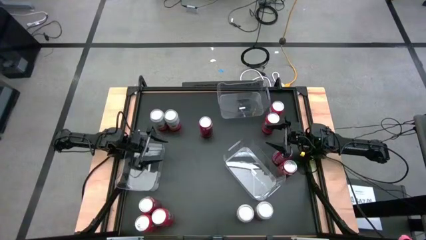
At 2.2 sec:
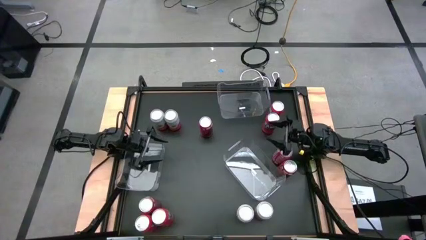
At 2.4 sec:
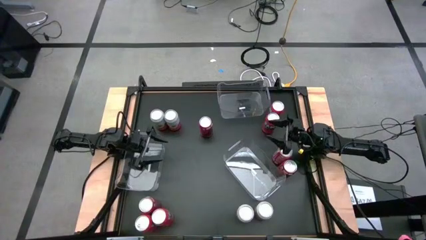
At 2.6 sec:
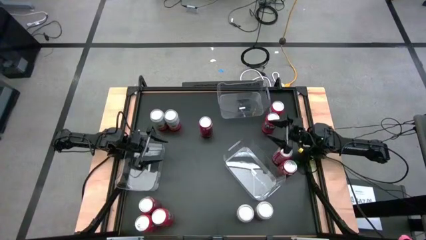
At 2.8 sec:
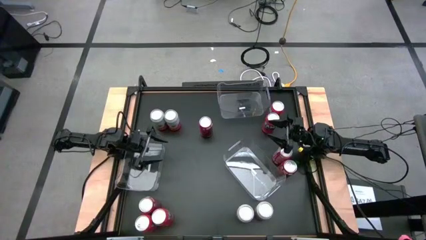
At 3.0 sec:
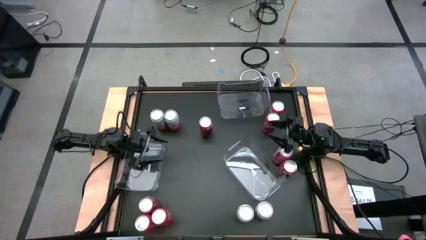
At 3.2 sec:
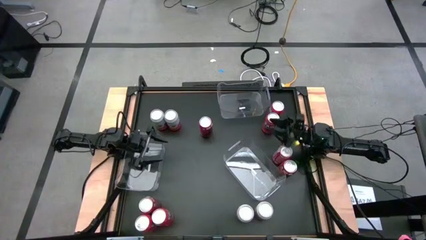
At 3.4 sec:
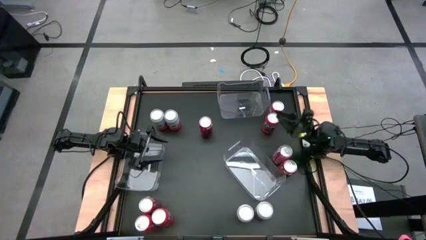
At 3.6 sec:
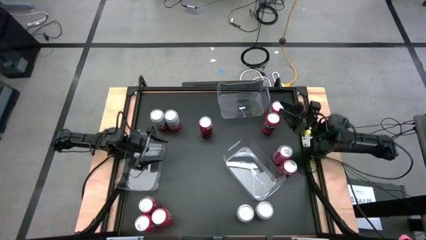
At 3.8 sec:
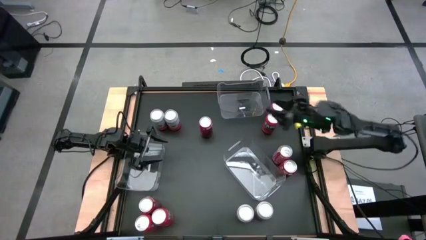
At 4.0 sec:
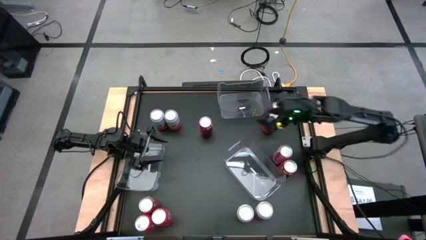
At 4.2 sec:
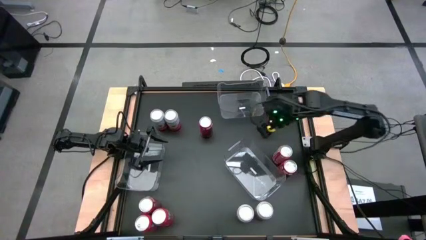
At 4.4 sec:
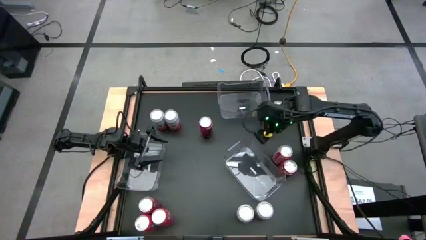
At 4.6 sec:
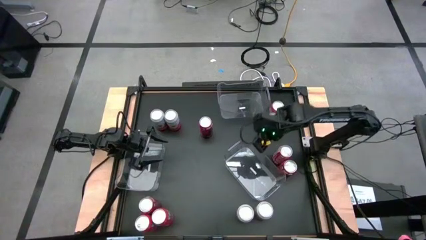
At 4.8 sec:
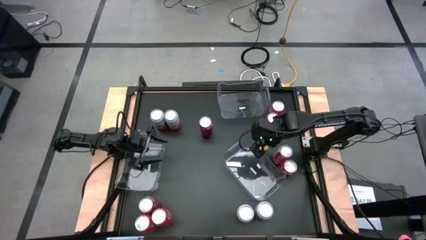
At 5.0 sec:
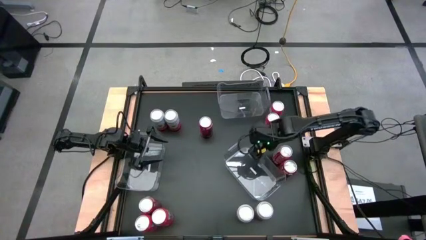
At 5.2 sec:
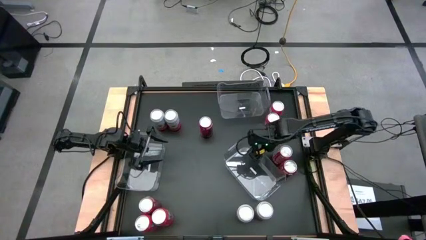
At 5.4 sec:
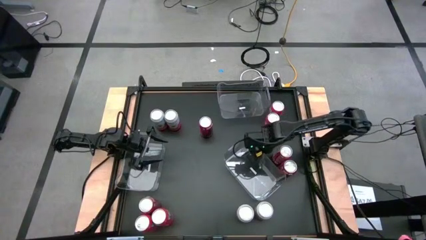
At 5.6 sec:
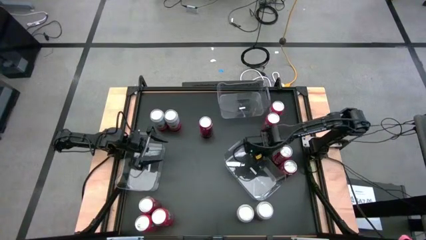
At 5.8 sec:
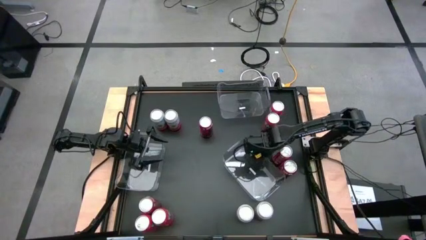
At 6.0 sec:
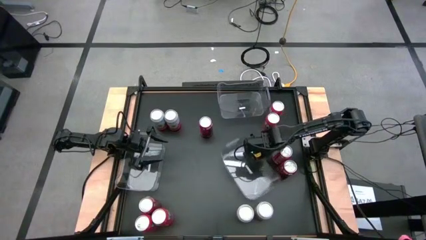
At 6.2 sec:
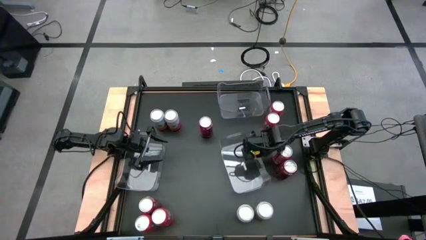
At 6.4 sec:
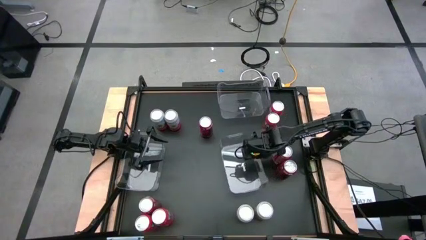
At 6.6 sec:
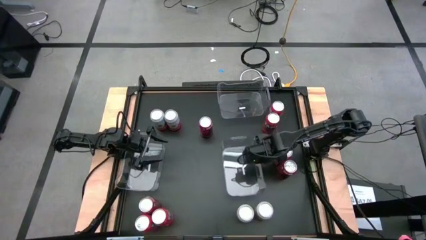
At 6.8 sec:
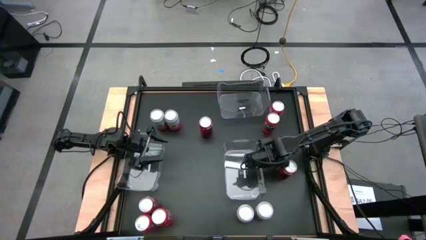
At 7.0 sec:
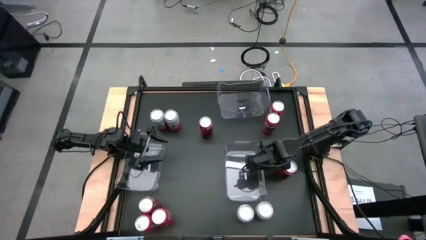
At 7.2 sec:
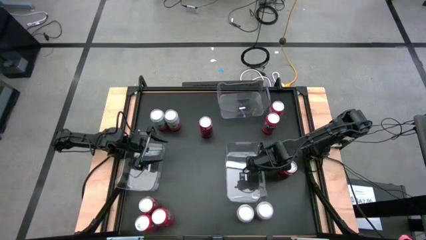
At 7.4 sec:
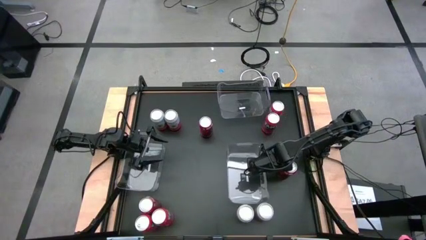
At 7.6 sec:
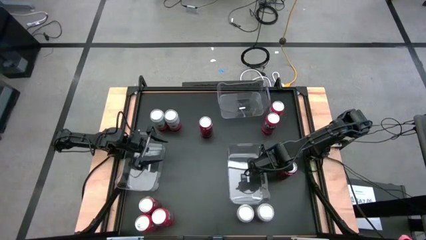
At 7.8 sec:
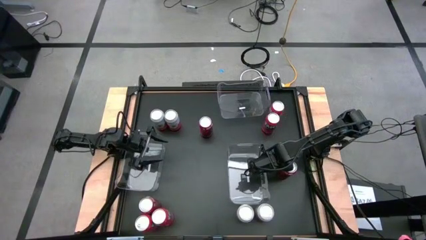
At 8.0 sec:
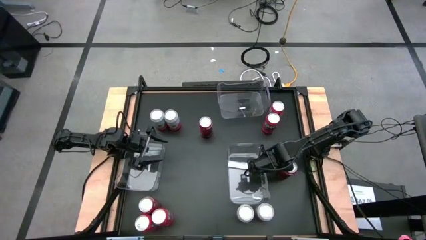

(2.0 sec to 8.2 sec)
Task: Sort soda cans
Adjust the bottom right transparent bin

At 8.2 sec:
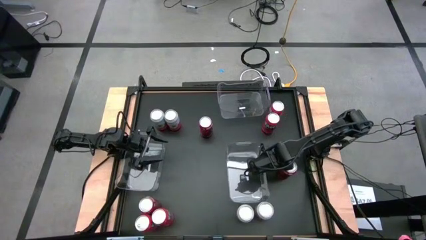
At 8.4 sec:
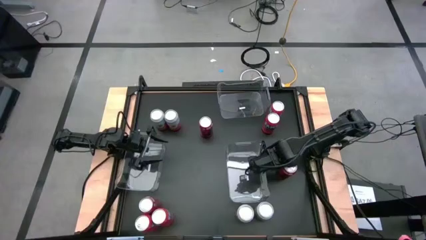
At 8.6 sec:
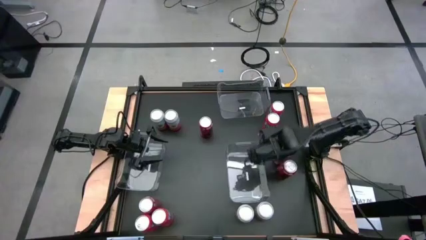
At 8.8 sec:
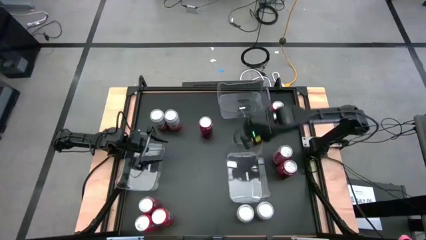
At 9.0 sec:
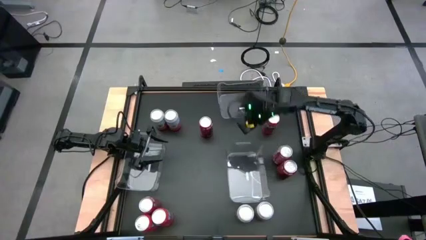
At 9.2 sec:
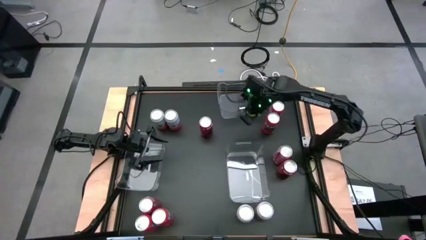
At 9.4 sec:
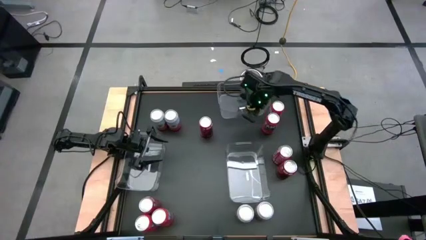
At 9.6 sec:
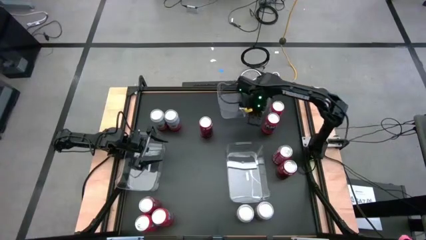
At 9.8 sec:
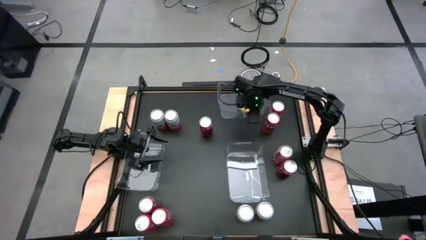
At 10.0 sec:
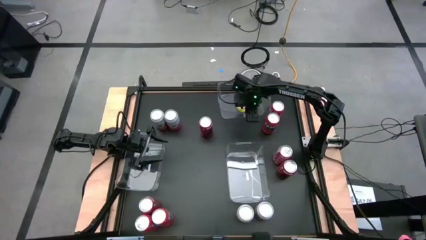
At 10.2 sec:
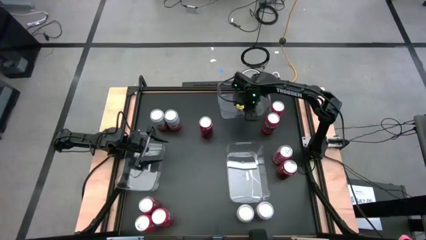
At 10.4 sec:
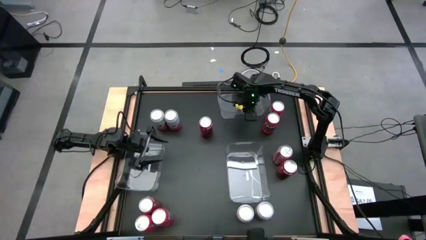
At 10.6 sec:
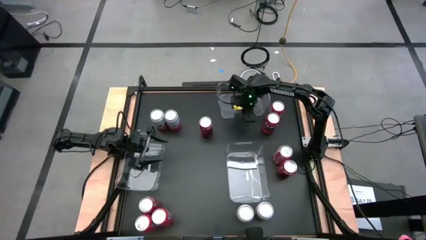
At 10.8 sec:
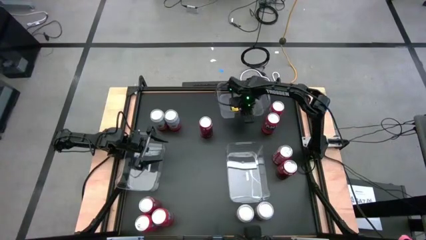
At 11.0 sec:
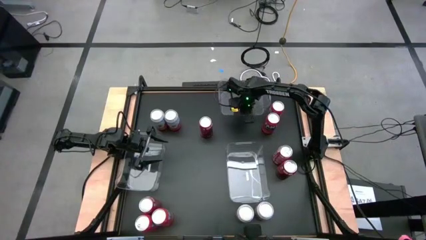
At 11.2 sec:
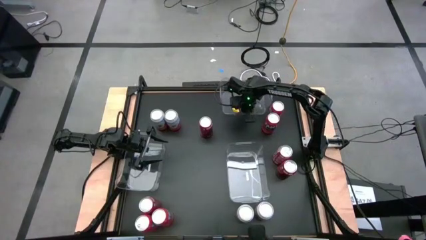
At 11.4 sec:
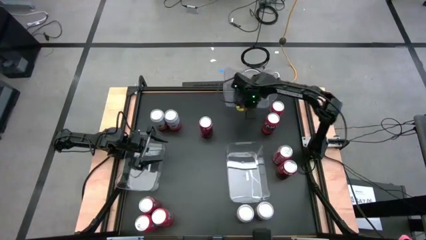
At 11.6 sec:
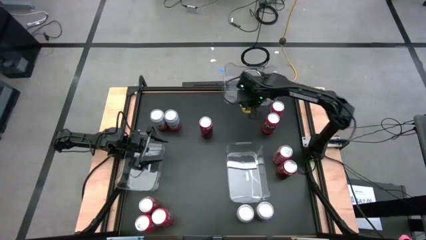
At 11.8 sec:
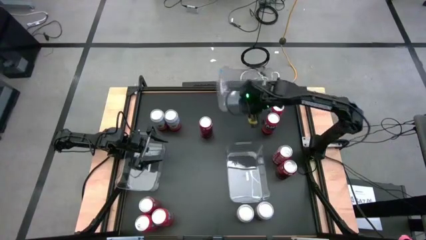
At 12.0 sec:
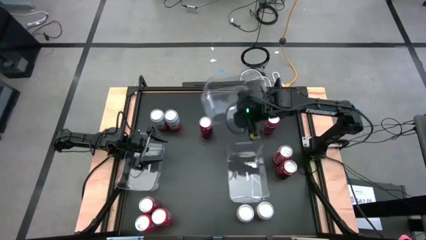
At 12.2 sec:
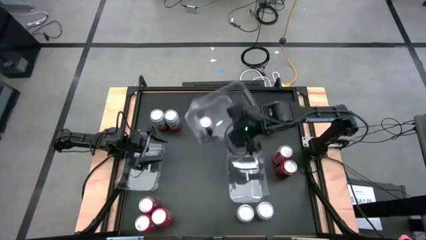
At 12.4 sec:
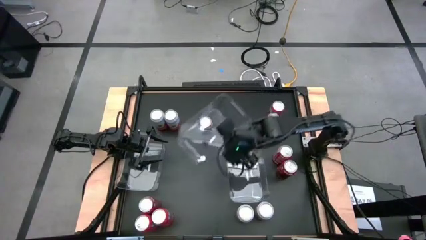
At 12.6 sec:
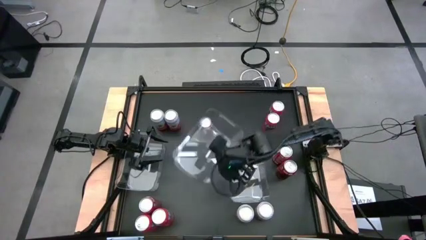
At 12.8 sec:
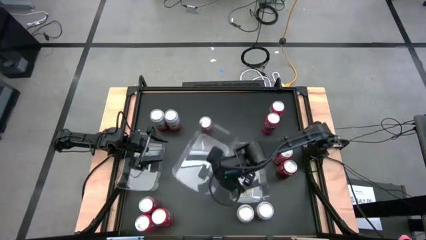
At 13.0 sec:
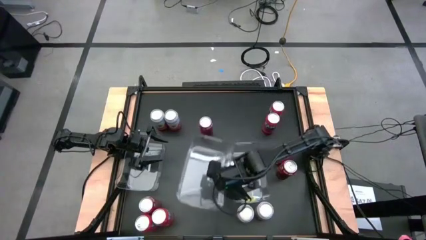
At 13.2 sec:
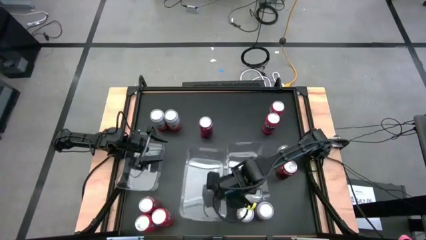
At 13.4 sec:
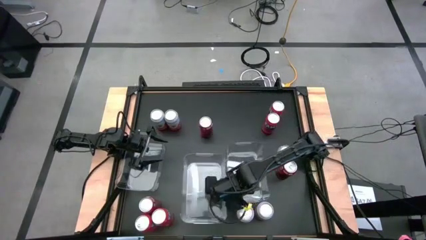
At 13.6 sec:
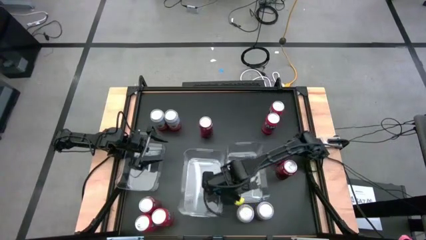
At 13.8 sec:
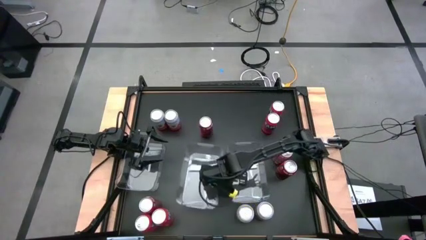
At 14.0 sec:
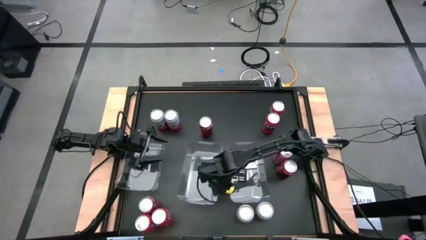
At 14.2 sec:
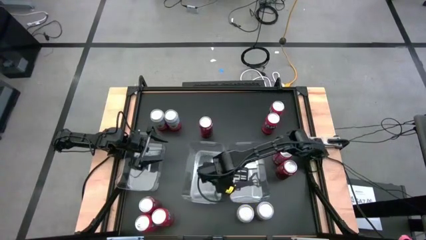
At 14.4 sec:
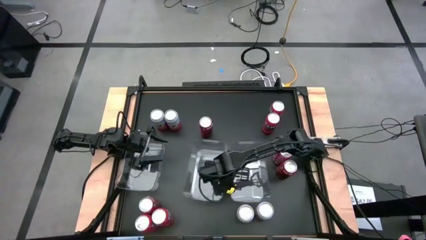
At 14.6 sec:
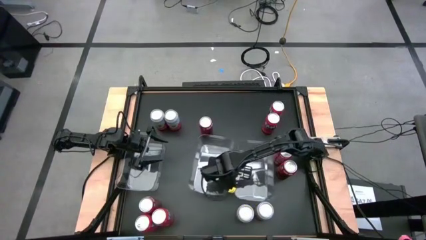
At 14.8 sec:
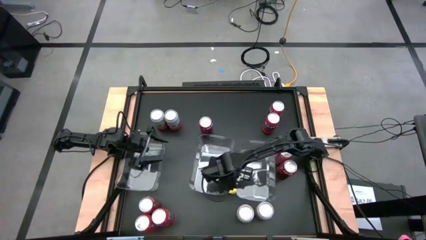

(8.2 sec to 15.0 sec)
Put the top transparent bin to the center of the table

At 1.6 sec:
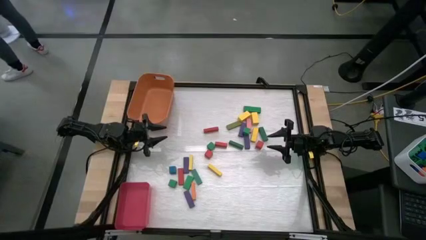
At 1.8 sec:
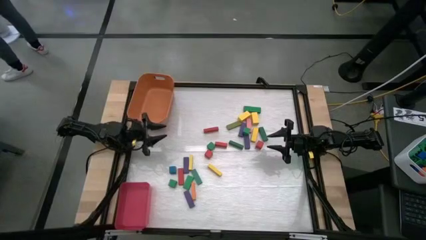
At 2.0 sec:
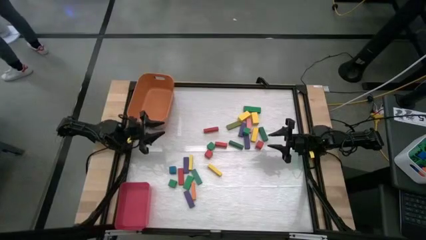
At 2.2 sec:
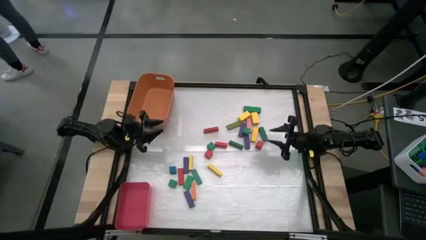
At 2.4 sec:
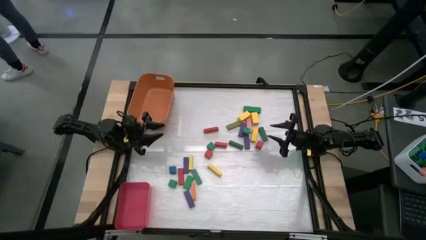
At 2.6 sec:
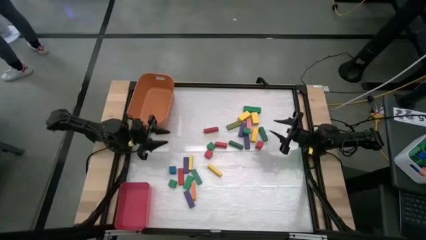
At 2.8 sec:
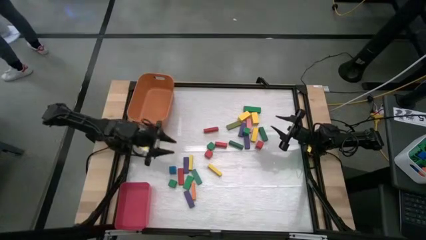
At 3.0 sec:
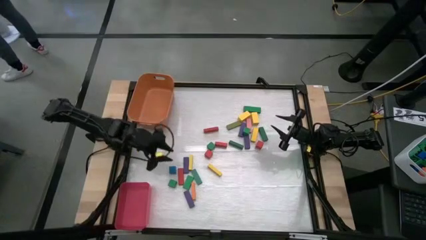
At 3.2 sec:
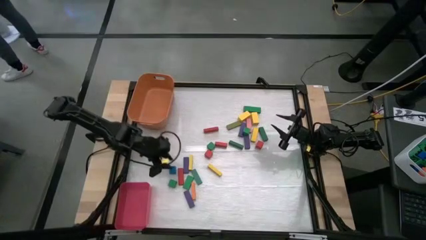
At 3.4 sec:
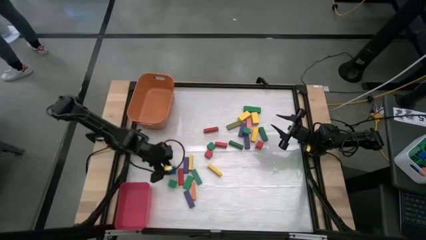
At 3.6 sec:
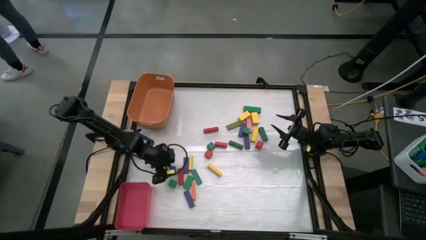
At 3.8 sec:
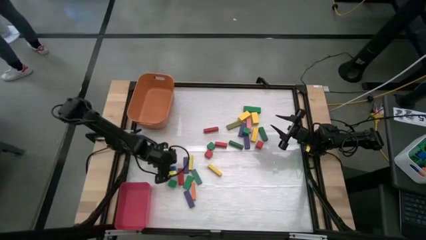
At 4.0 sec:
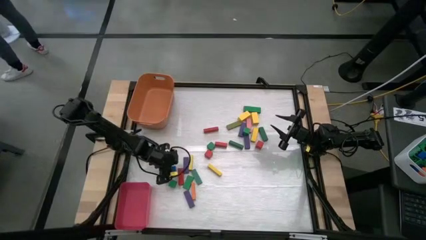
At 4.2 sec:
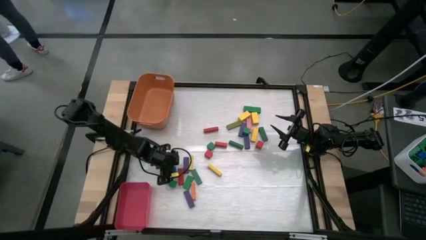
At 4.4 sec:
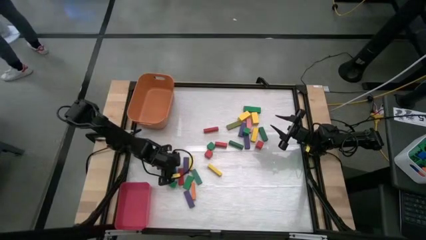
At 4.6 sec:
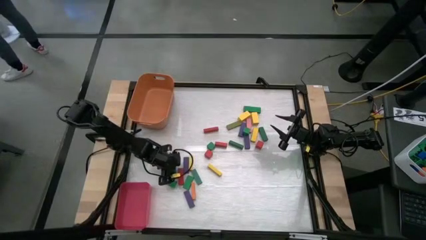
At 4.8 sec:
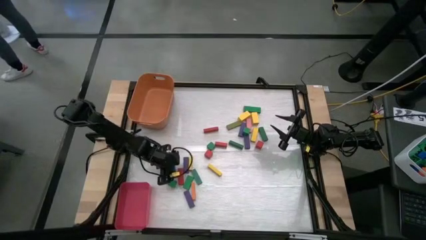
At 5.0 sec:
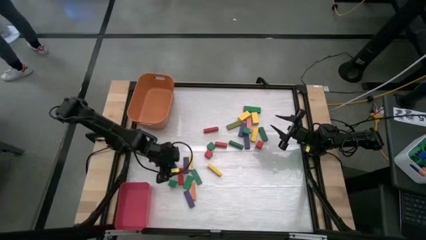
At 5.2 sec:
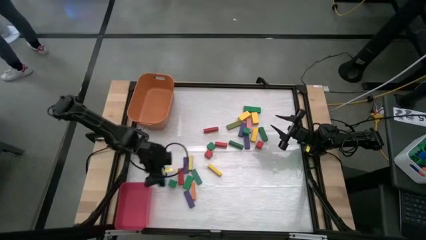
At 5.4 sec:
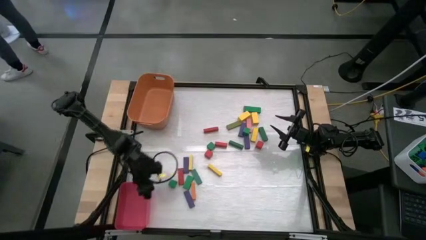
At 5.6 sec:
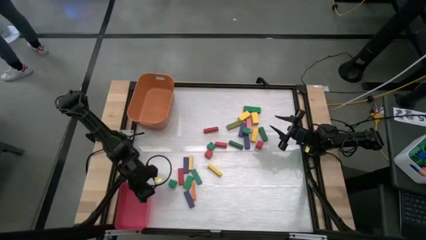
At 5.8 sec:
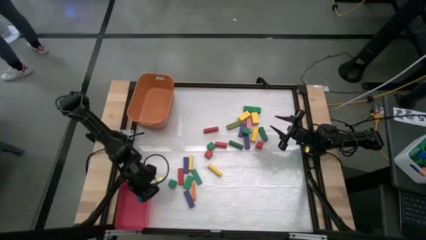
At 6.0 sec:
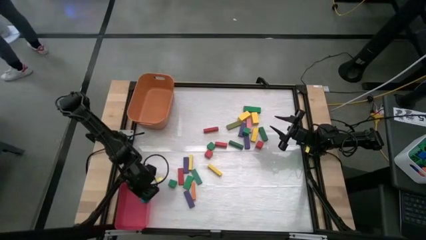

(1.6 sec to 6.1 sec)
Task: Sort blocks by size
Put the small blue block into the red bin
